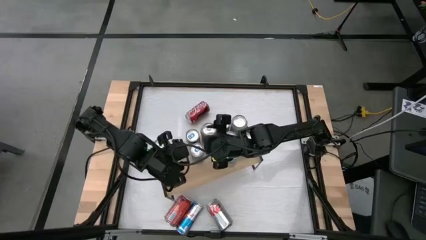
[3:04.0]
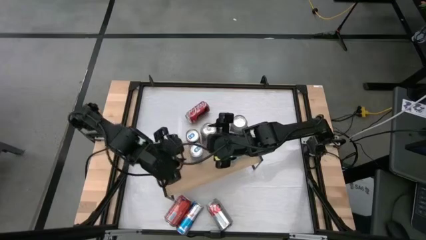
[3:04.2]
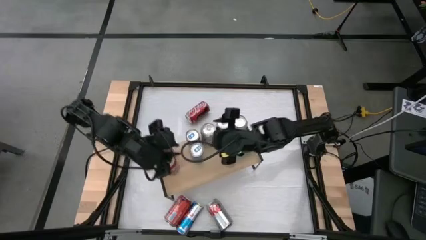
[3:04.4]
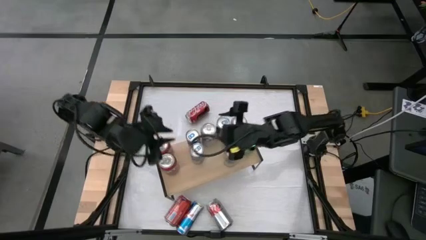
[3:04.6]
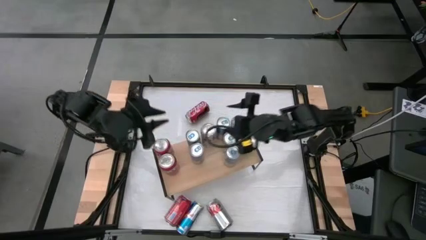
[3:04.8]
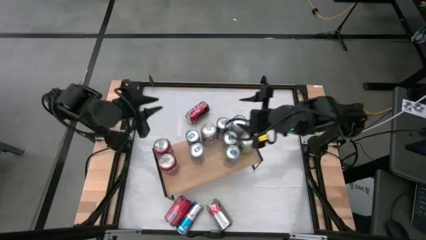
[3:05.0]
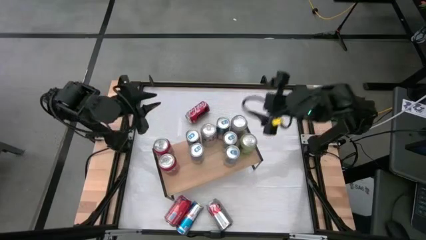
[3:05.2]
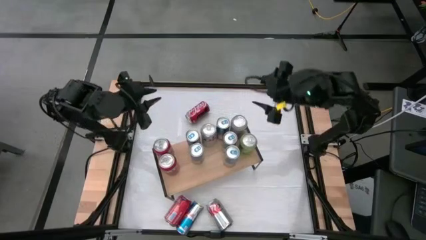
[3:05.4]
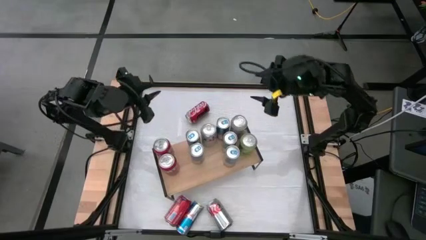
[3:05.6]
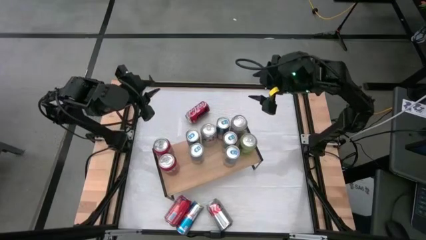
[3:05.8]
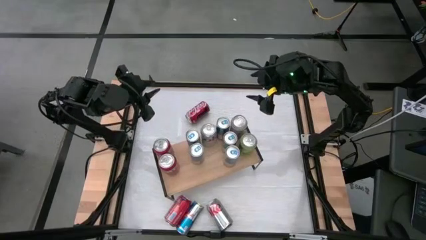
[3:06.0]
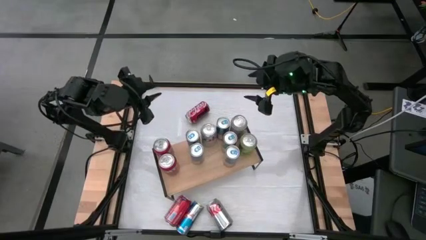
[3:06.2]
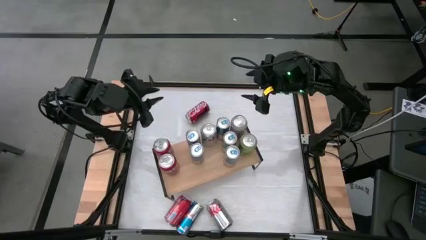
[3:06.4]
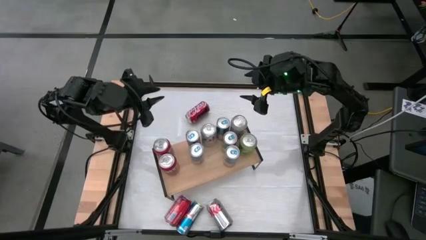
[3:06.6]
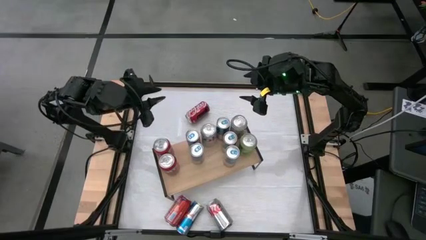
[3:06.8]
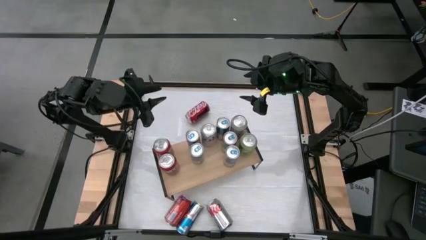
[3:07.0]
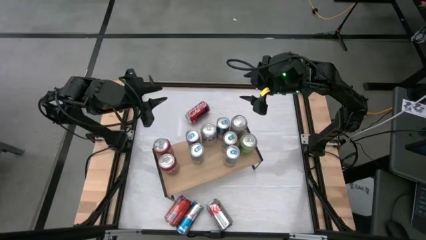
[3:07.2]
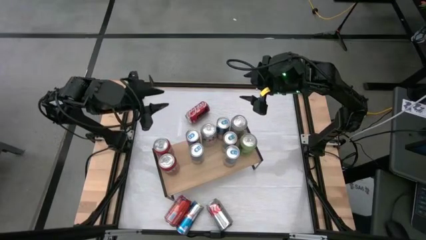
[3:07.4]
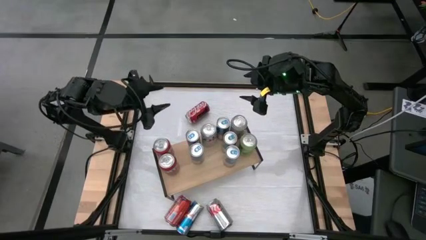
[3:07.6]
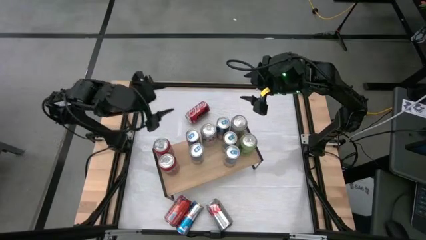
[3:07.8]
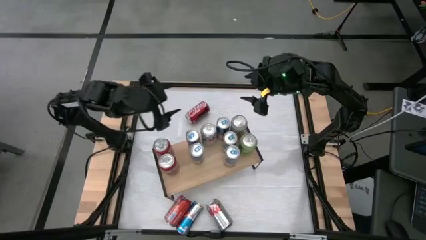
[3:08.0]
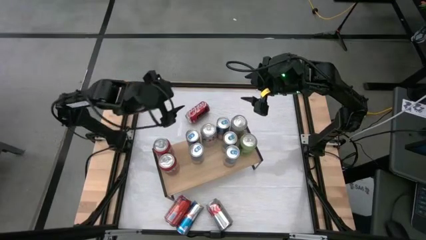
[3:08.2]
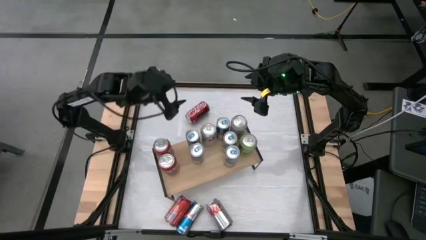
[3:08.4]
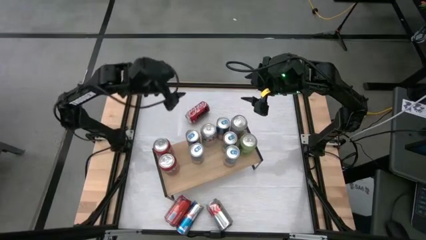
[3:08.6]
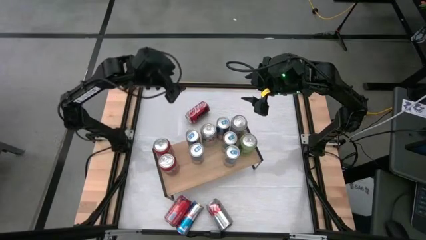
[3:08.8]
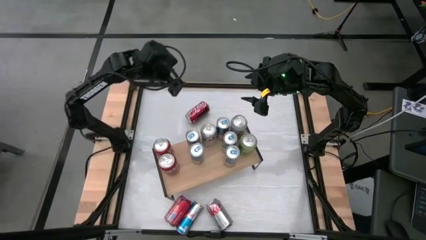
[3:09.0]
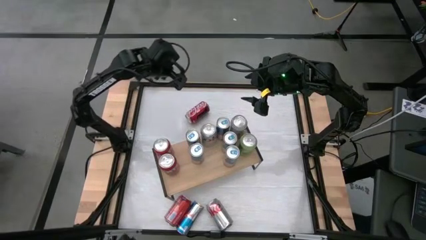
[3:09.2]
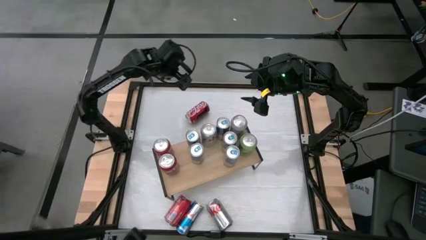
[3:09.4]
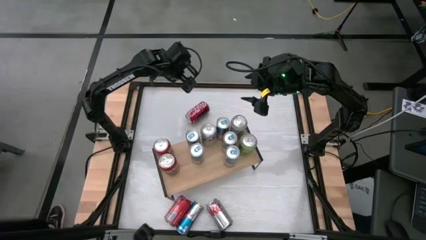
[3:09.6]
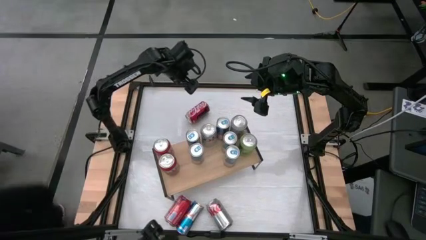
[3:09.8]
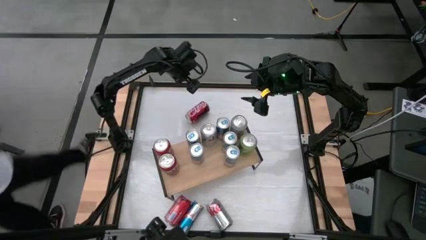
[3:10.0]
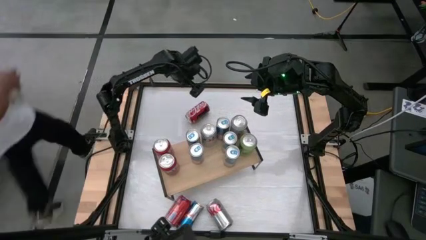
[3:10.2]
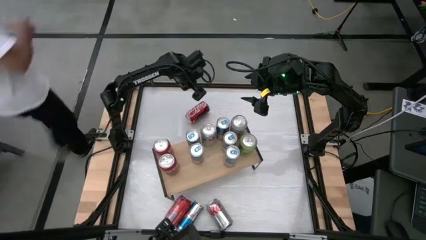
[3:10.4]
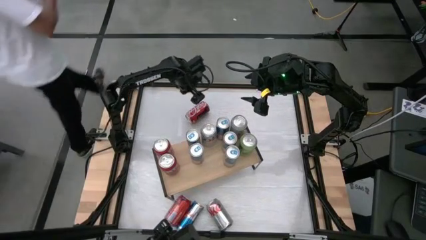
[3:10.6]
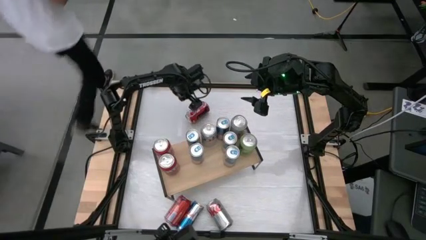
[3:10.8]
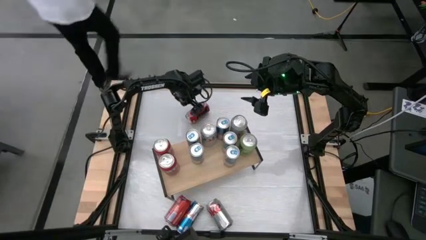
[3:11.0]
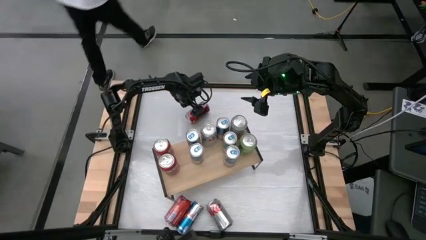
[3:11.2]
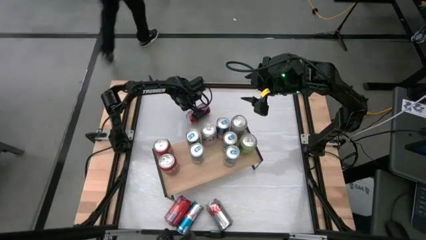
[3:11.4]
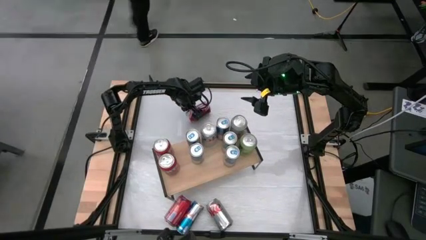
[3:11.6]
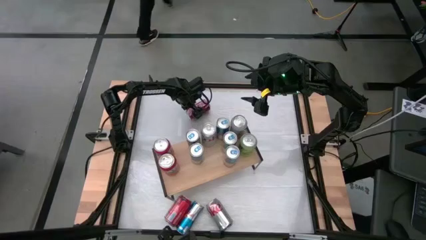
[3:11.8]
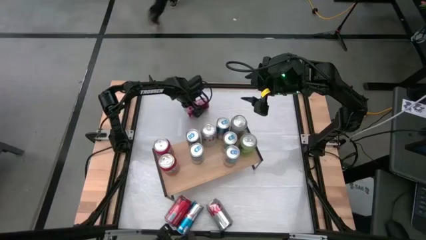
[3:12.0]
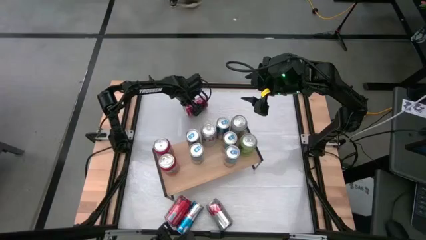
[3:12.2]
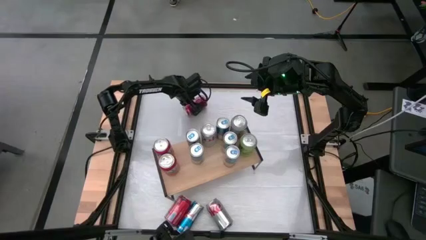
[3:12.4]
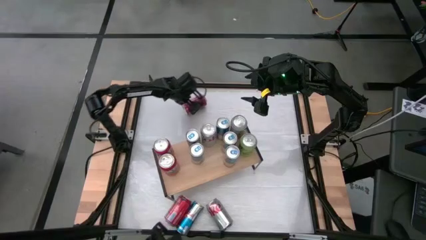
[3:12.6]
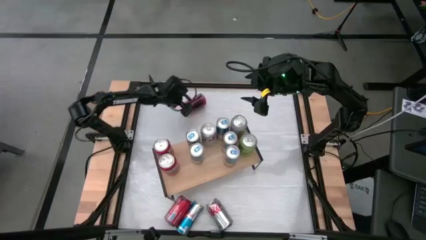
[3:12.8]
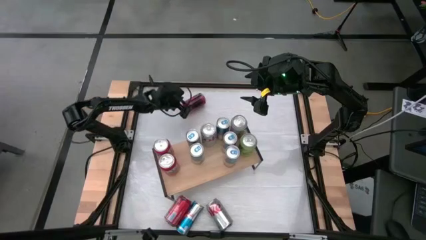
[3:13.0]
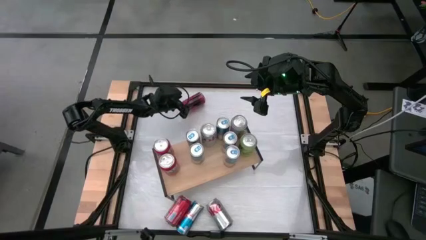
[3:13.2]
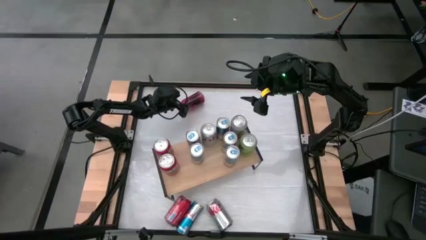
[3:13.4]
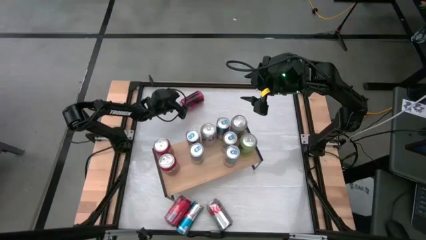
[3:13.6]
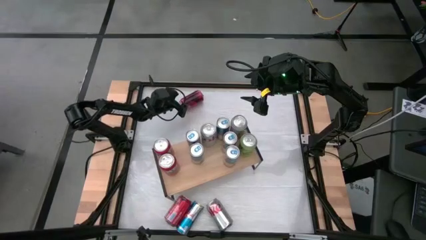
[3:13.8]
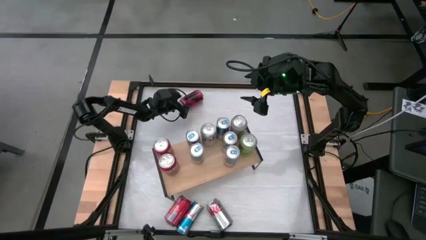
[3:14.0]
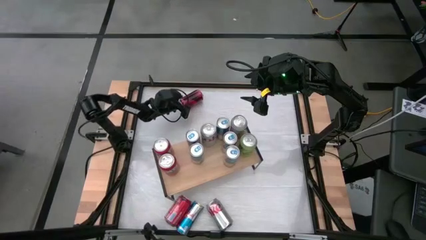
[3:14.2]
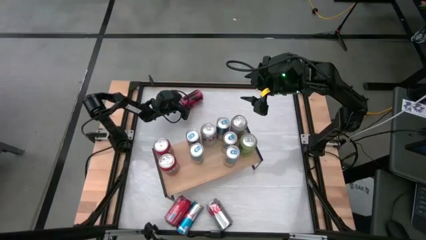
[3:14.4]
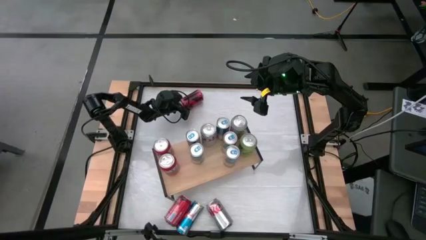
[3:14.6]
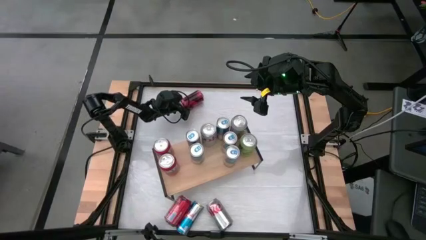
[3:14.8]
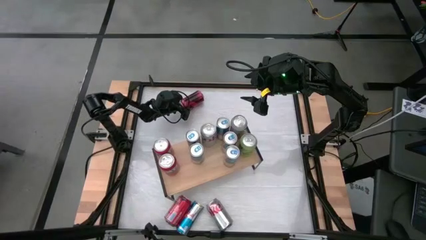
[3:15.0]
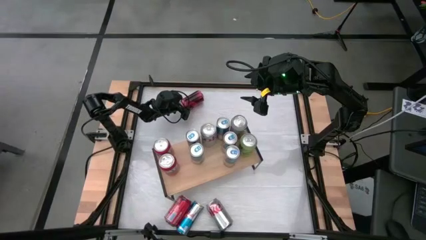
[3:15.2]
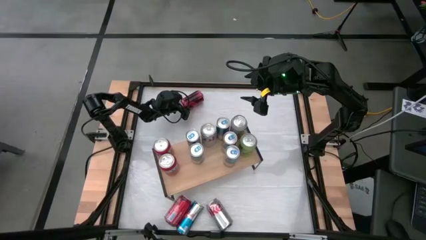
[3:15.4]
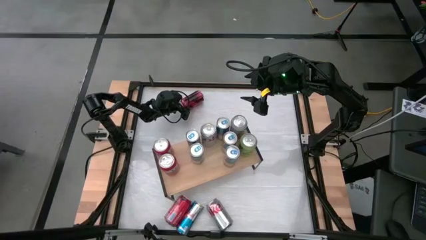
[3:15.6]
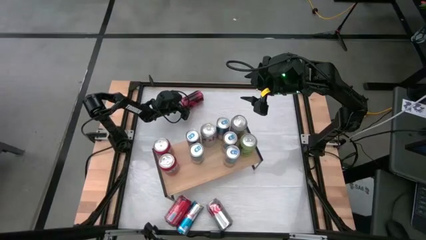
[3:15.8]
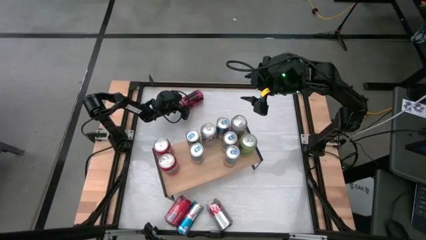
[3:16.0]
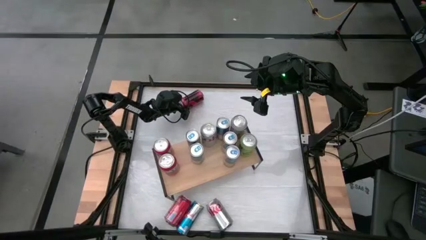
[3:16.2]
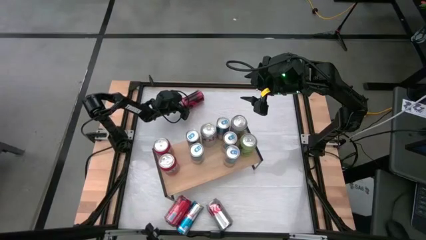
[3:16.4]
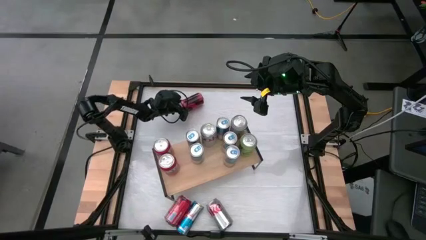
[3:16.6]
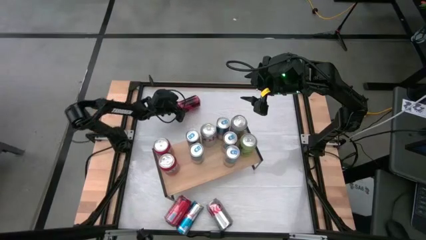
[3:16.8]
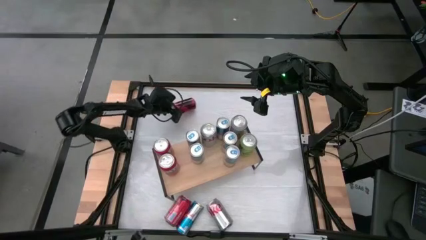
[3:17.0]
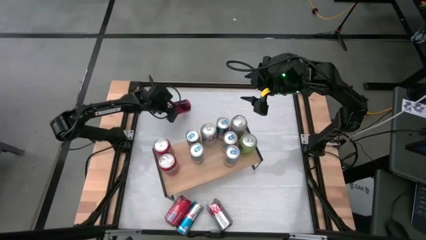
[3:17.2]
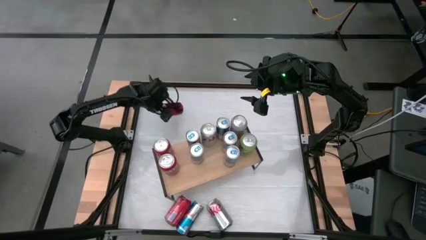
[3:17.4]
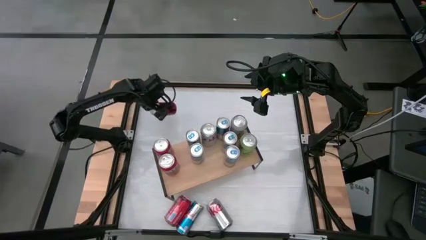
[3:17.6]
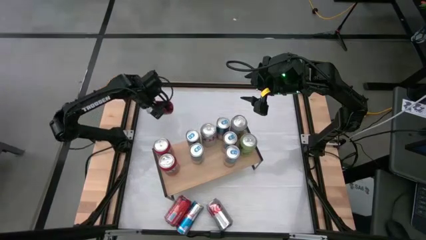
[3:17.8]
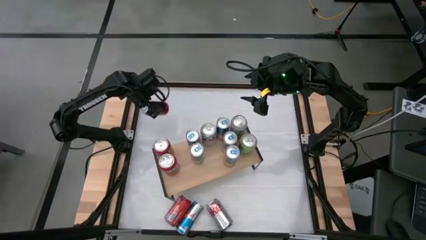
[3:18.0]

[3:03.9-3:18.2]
Task: Place canned beverage on shelf
Put the red white soda can on the shelf

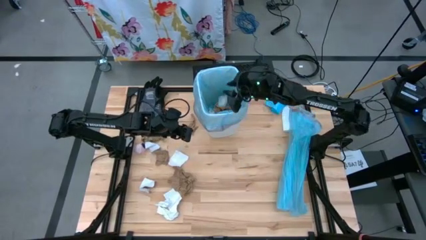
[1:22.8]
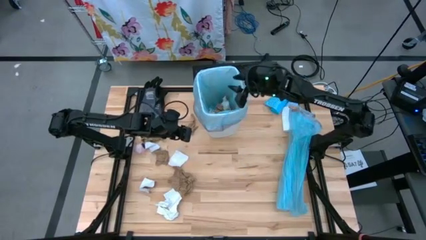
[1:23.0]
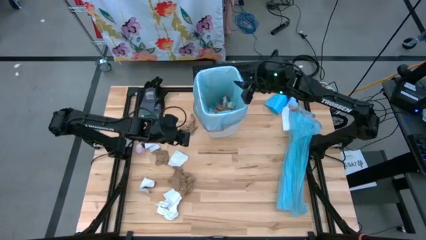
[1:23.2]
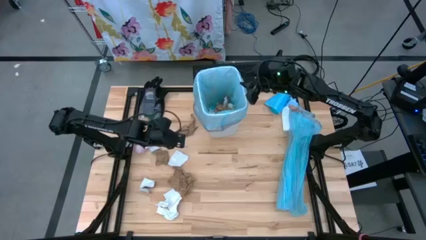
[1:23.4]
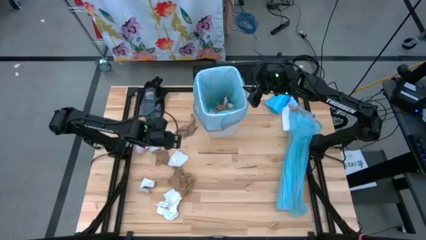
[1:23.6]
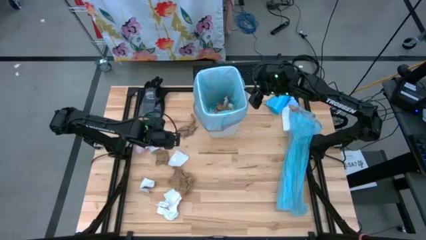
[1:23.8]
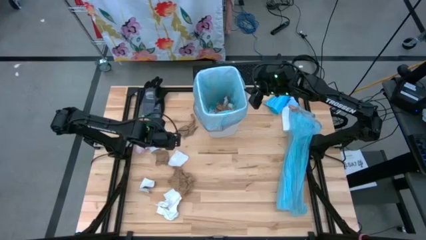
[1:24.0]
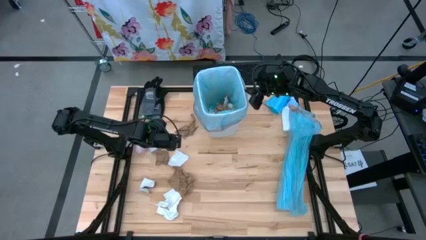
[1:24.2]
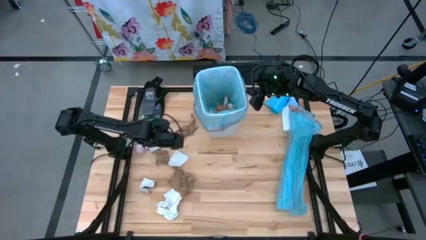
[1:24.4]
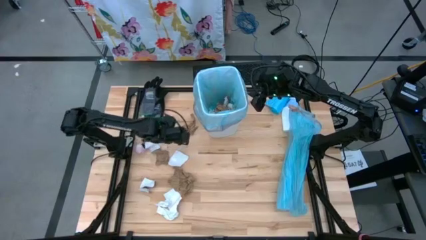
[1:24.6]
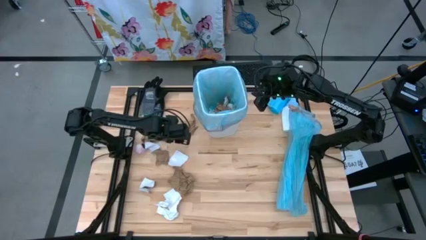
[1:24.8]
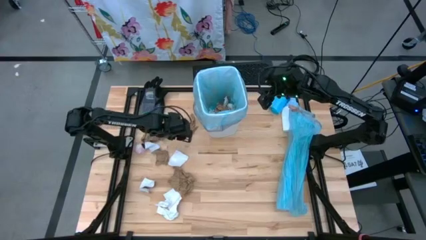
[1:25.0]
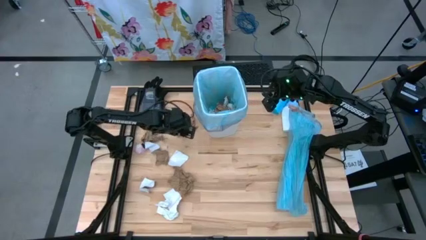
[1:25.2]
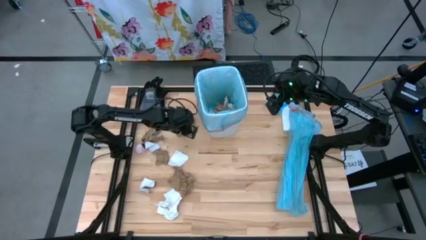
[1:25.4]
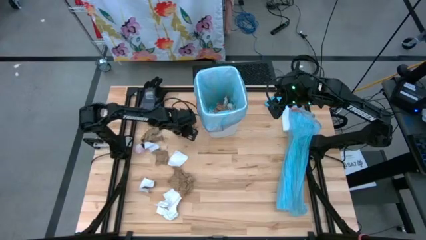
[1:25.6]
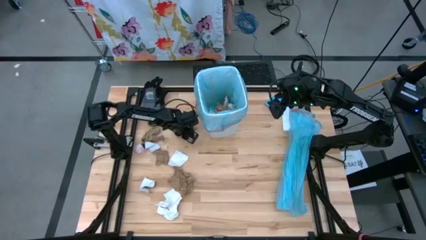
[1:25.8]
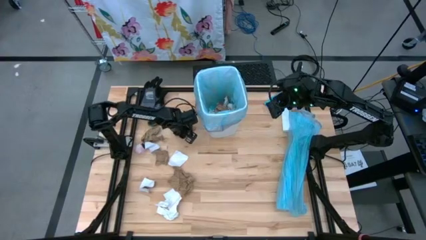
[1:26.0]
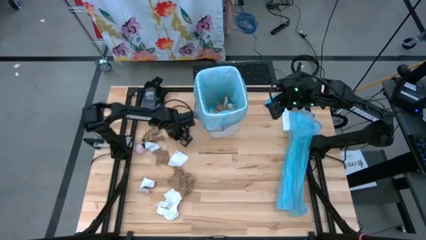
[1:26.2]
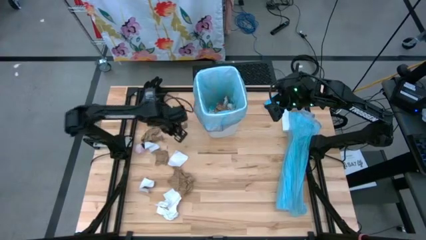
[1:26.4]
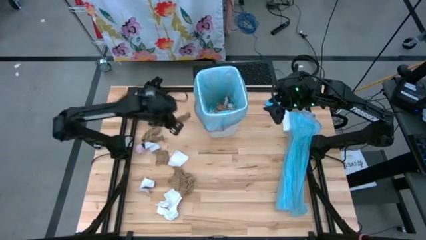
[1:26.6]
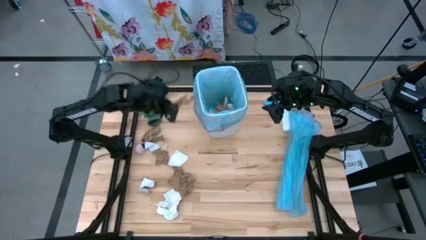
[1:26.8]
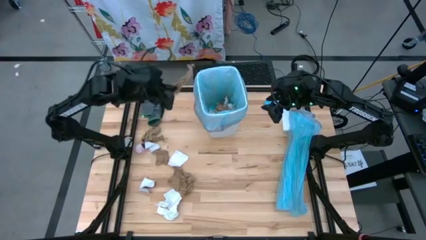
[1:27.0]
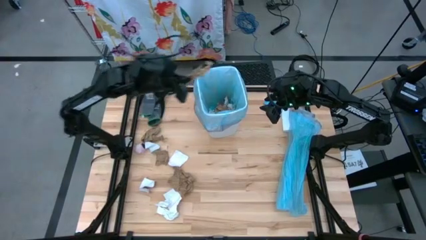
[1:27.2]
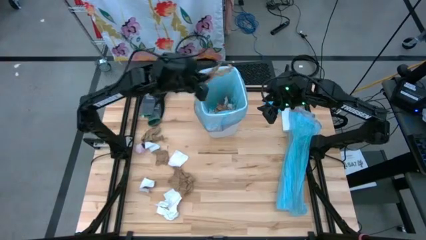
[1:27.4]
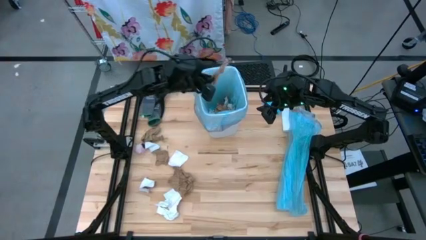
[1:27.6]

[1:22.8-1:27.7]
Task: place trash/remove bag and relplace
Put the brown napkin into the trash bin
